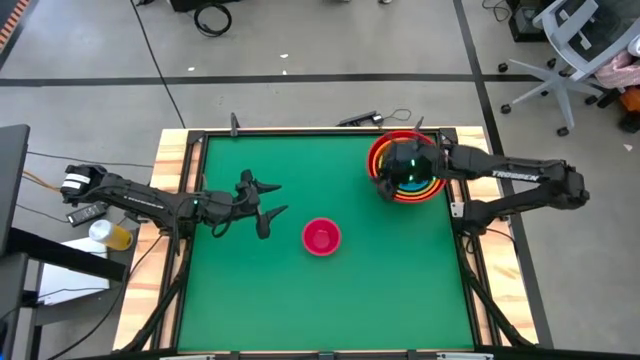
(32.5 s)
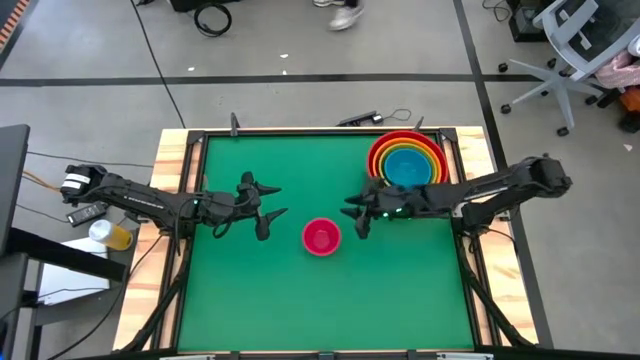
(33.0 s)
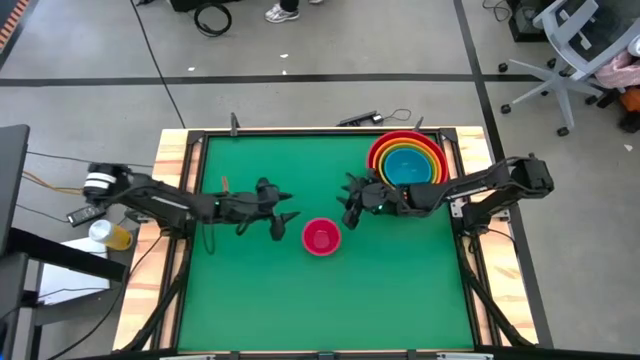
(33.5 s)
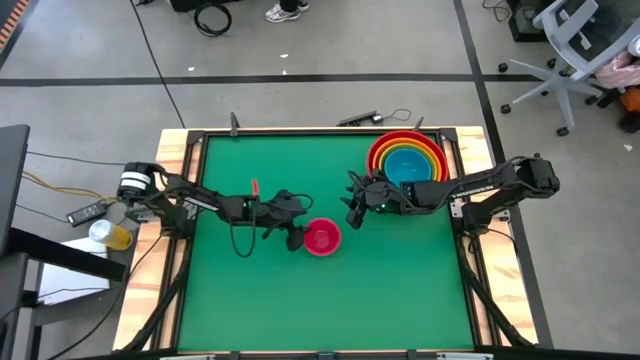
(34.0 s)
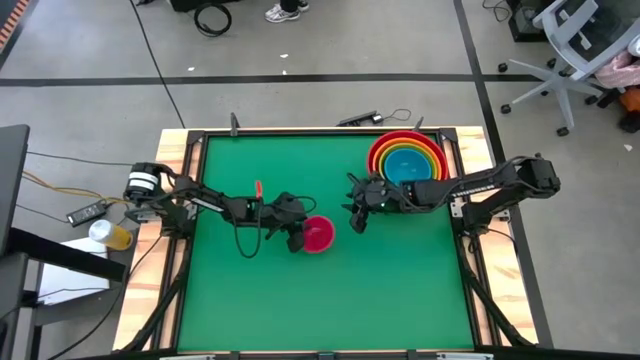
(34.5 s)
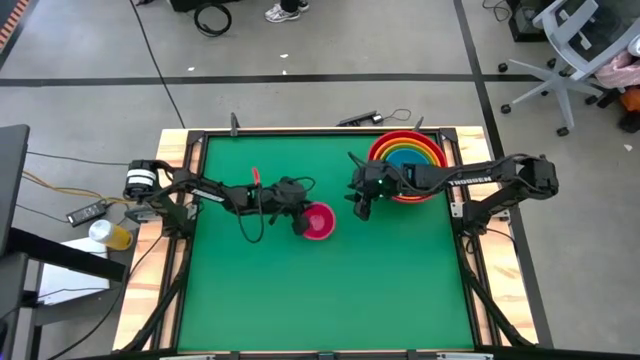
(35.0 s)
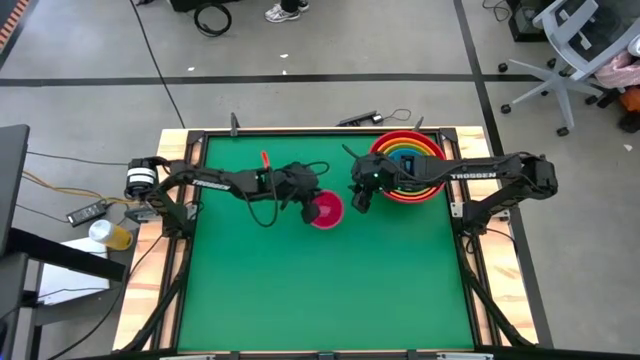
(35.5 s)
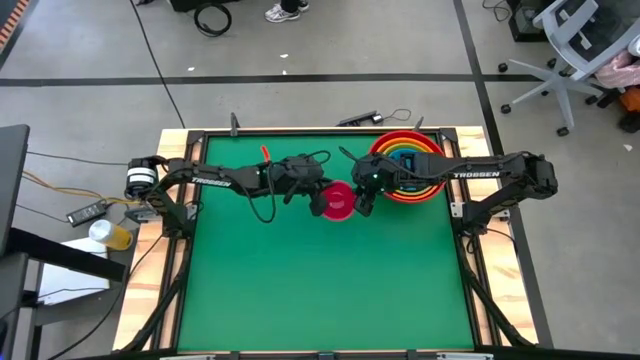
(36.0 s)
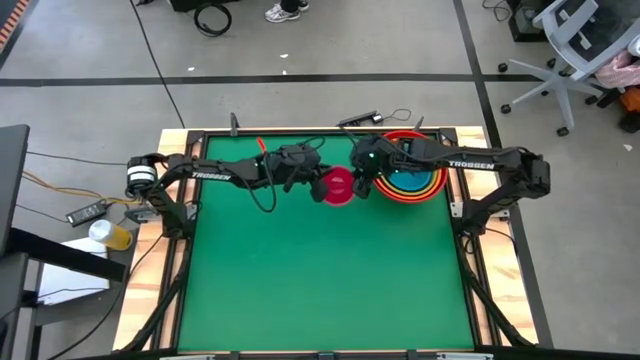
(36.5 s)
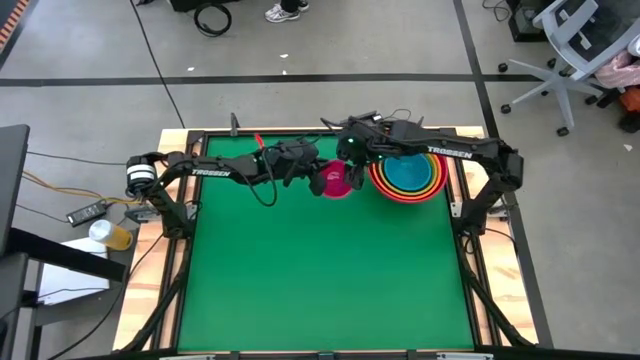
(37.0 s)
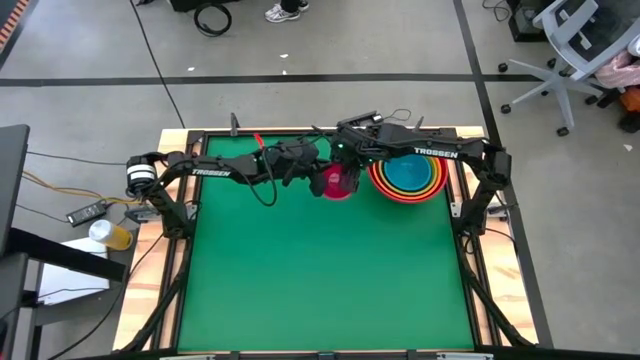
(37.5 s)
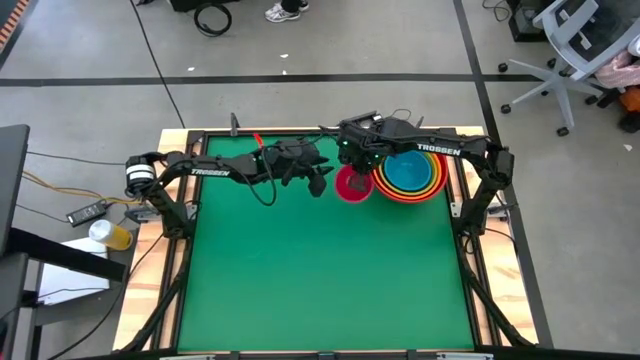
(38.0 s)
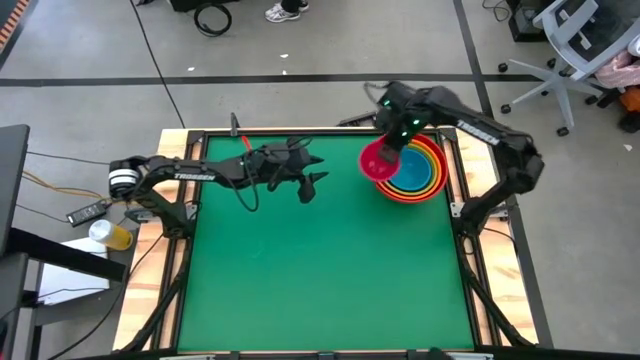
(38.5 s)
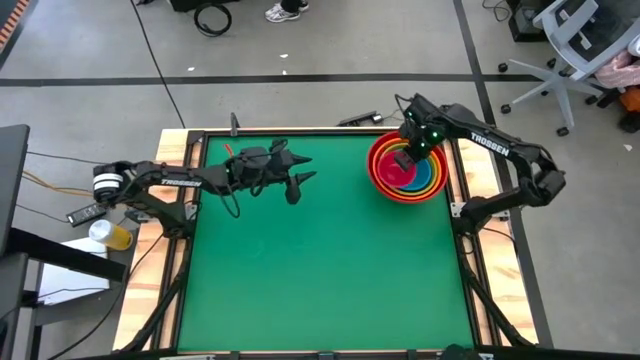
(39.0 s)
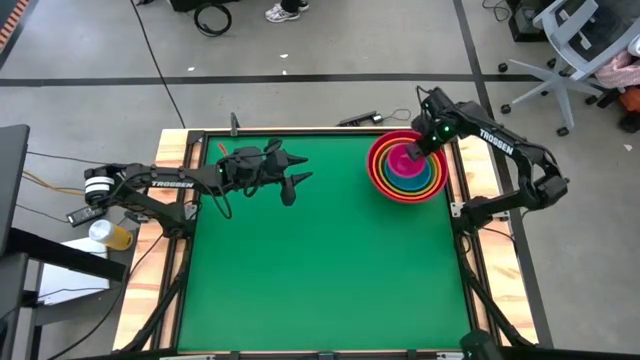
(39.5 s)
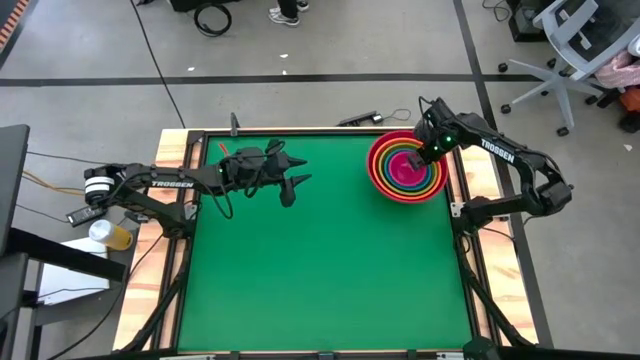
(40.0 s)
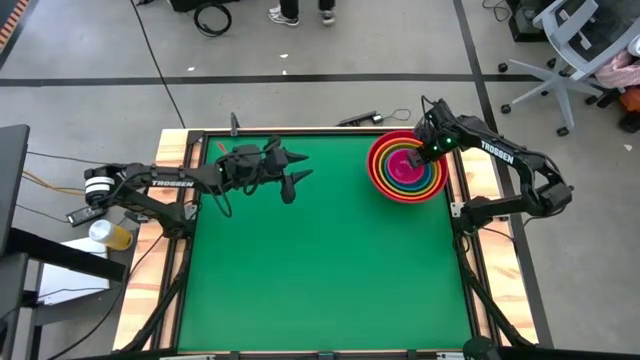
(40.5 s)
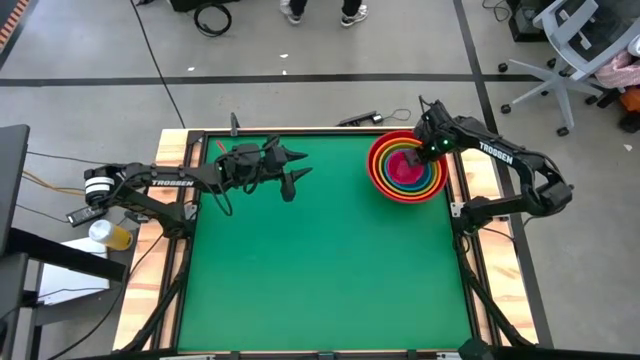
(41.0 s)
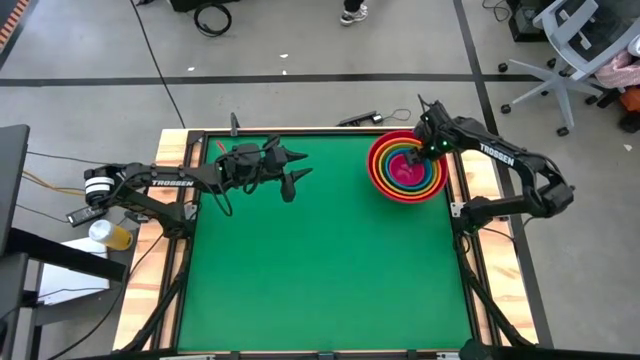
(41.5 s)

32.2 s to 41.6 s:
Stack the pink bowl on top of the blue bowl

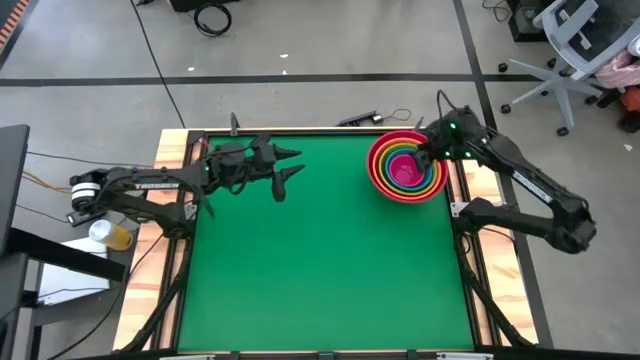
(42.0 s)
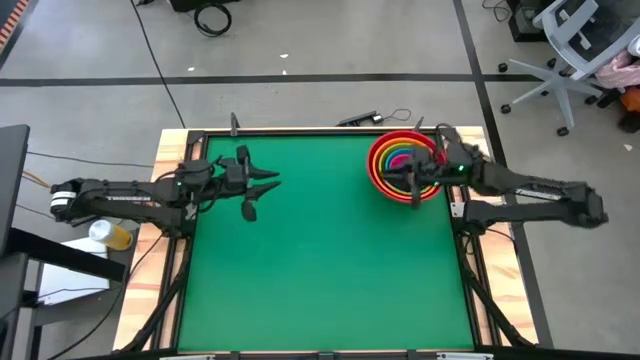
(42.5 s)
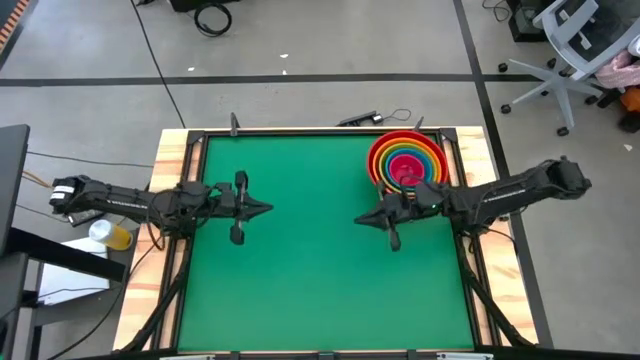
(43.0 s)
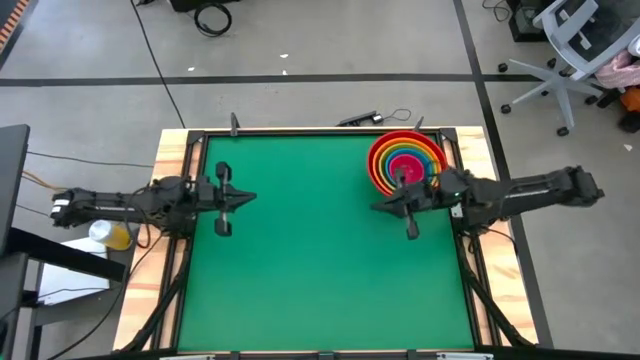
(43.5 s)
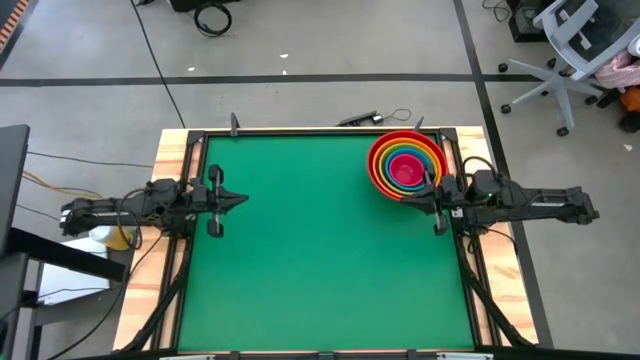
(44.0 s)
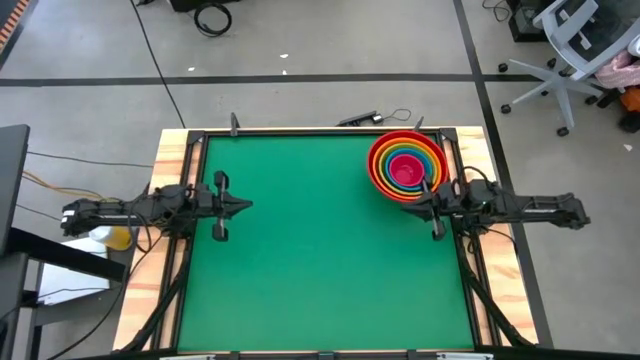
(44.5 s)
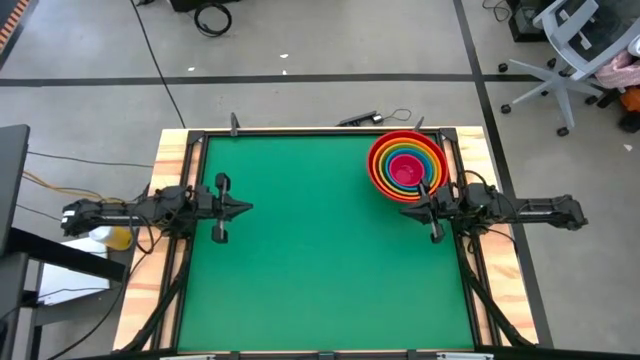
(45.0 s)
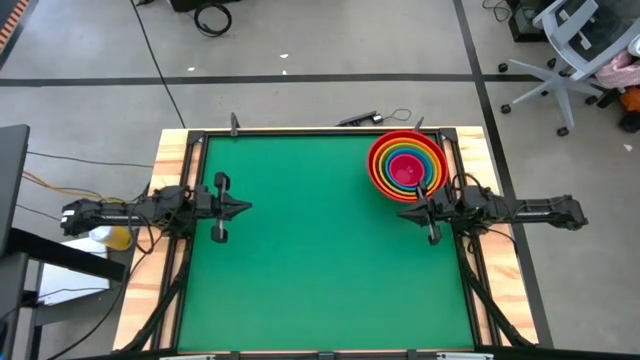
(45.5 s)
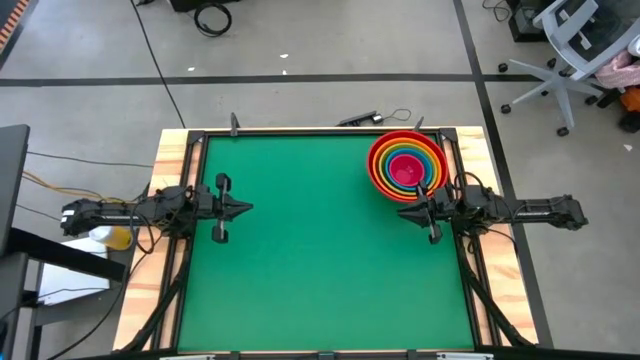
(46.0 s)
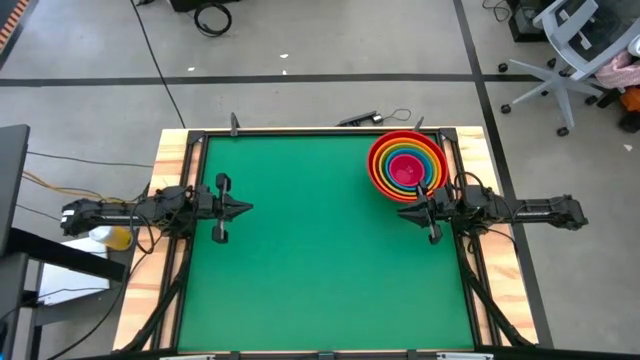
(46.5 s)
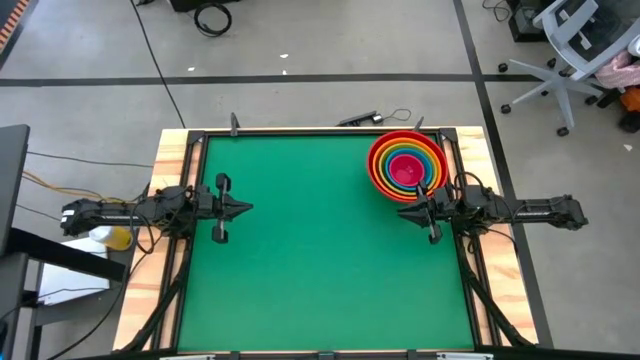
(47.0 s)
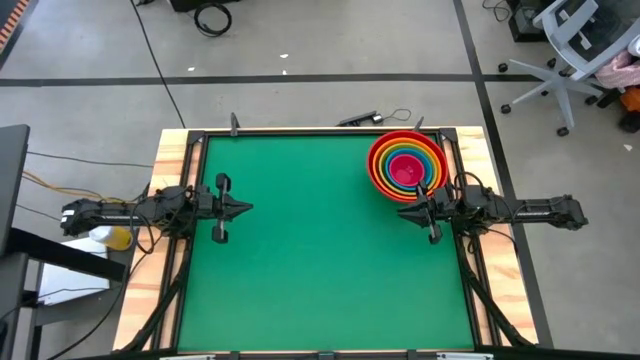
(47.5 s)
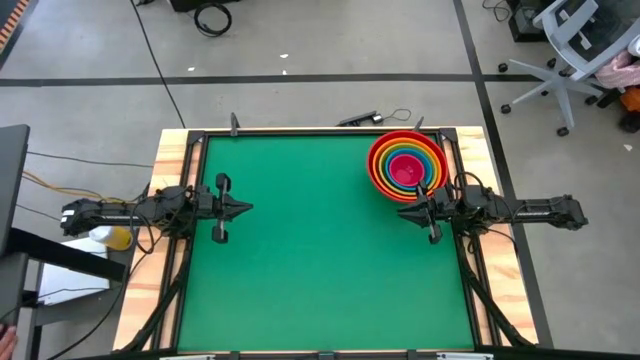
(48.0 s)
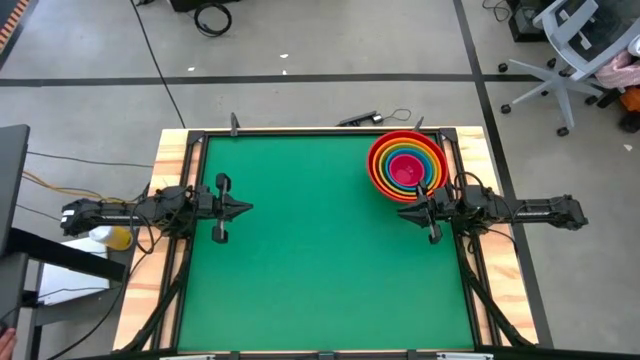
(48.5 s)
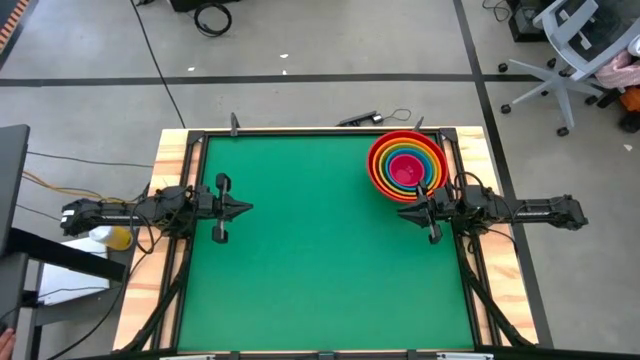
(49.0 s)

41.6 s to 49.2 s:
Return to Home Position
